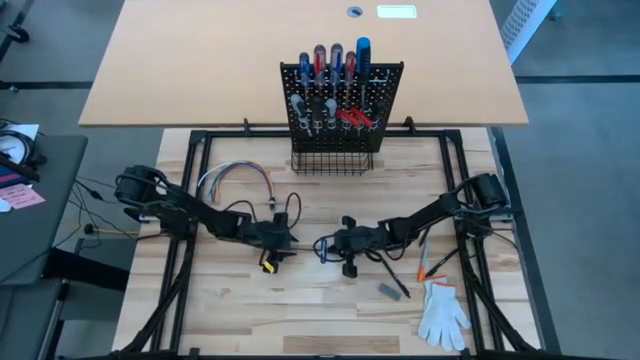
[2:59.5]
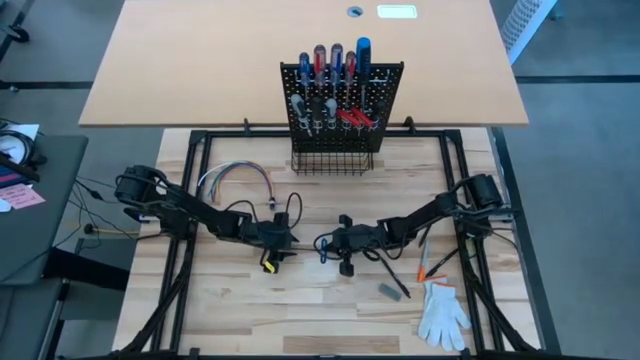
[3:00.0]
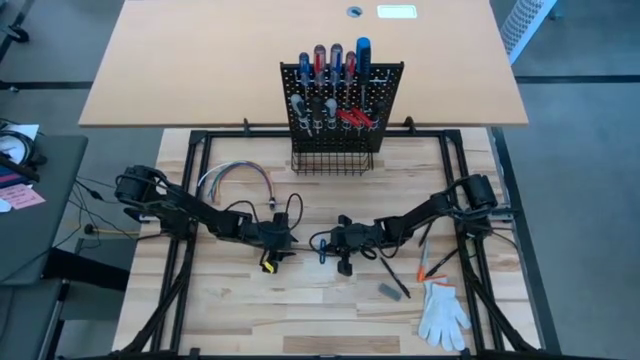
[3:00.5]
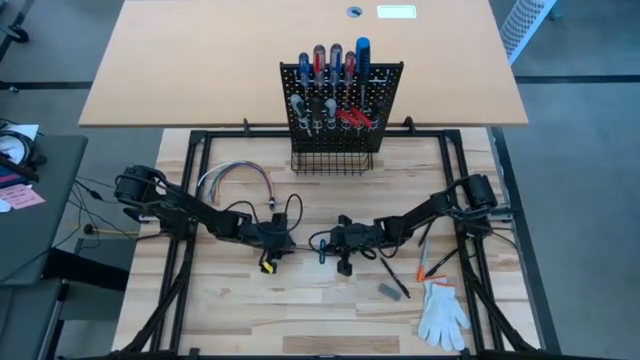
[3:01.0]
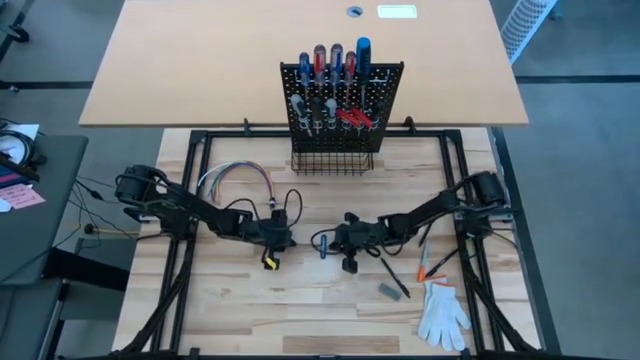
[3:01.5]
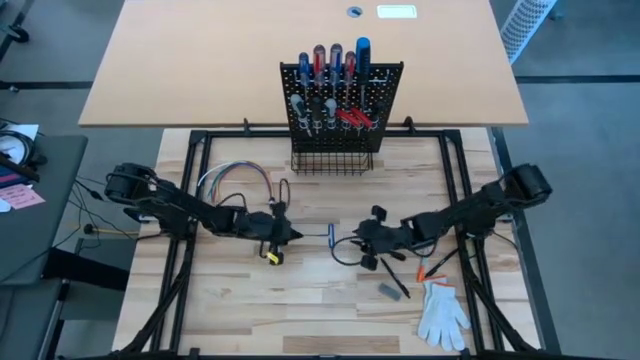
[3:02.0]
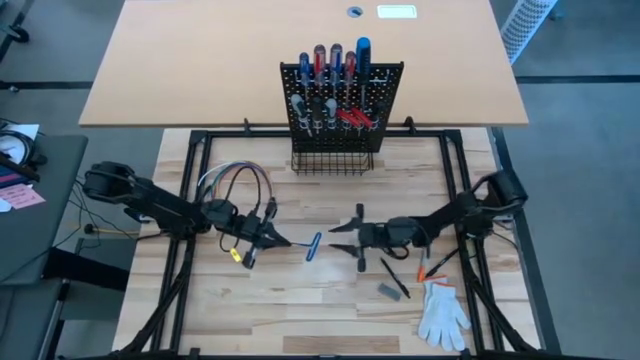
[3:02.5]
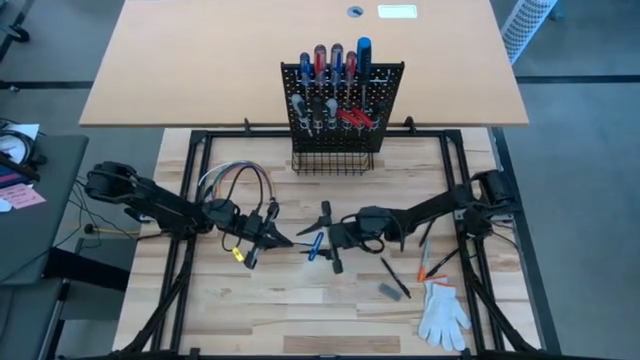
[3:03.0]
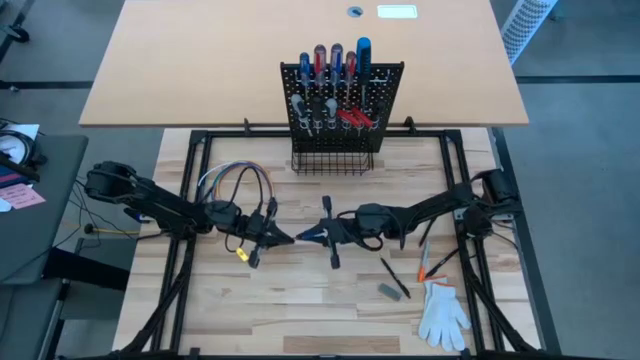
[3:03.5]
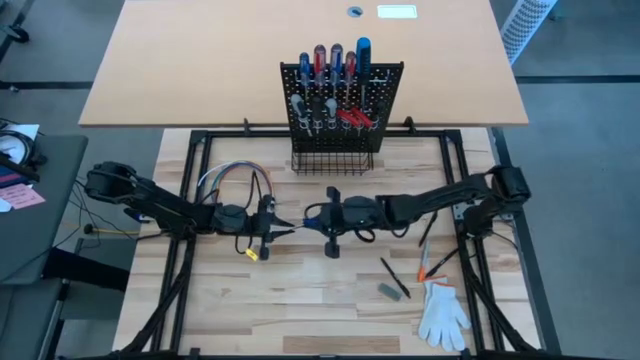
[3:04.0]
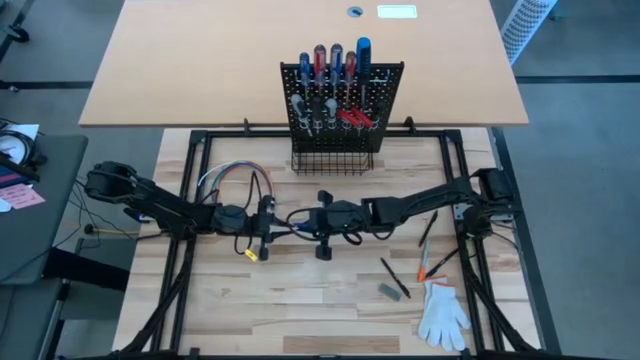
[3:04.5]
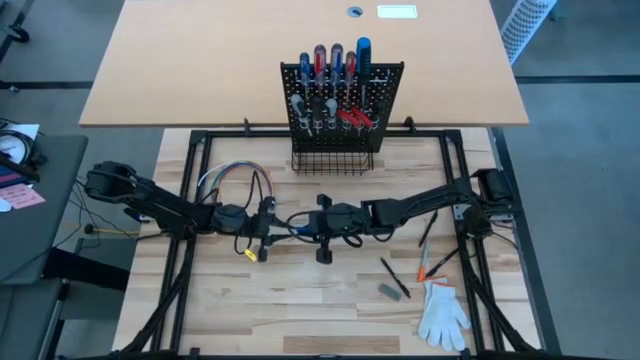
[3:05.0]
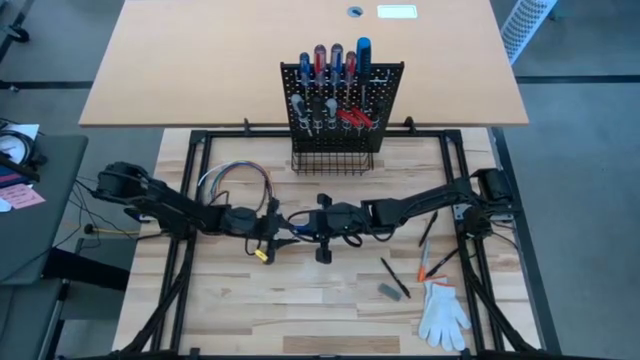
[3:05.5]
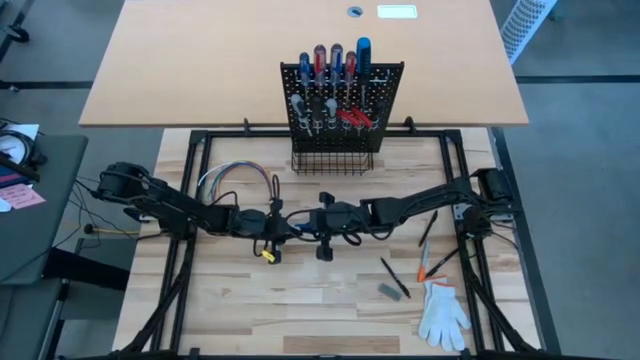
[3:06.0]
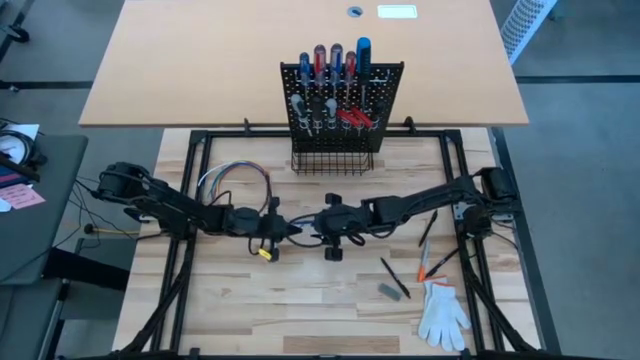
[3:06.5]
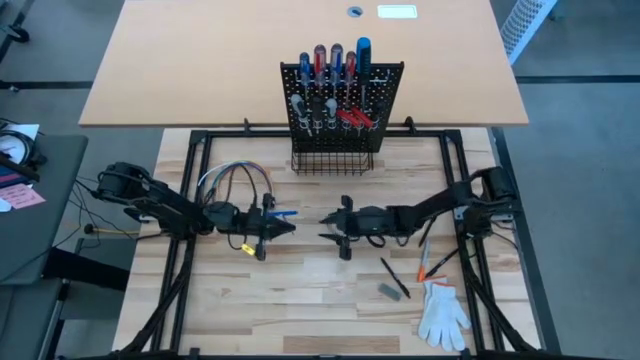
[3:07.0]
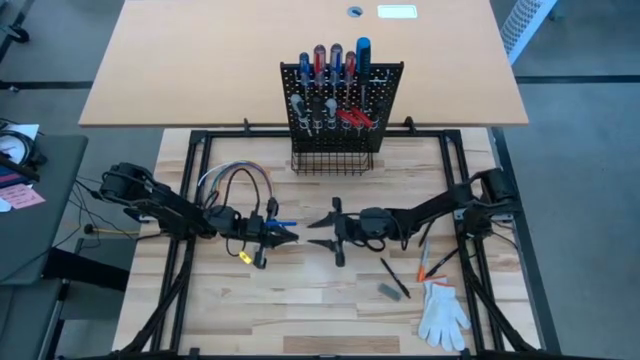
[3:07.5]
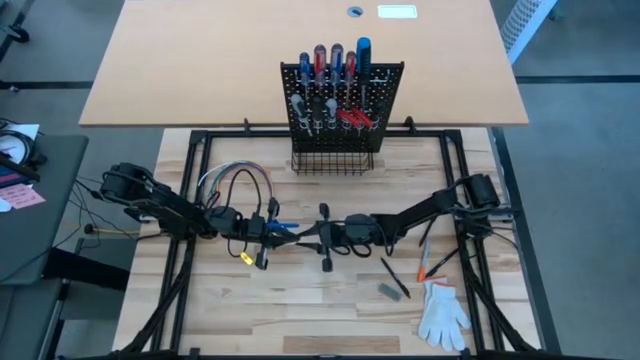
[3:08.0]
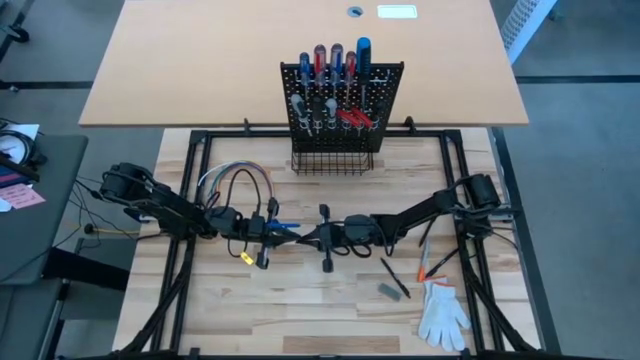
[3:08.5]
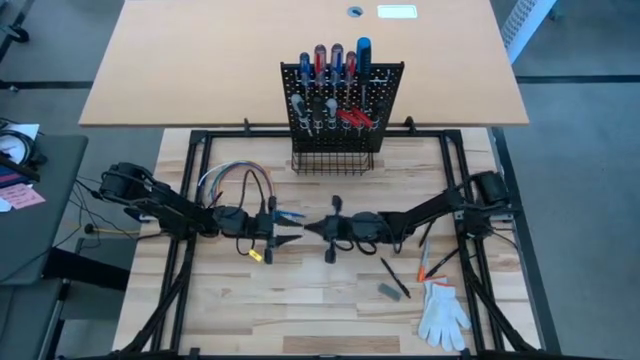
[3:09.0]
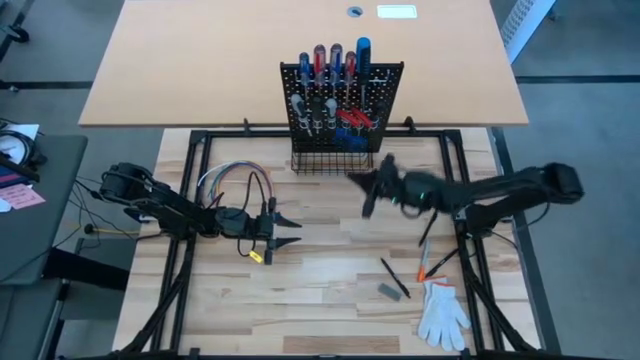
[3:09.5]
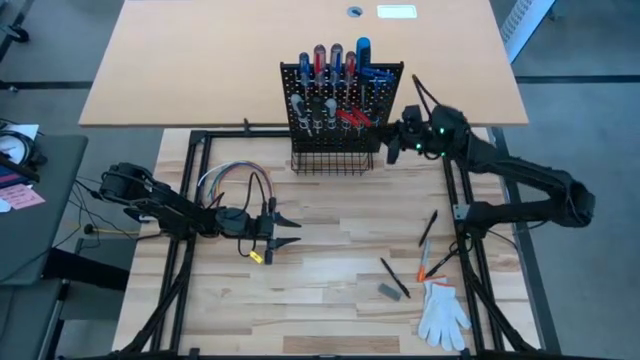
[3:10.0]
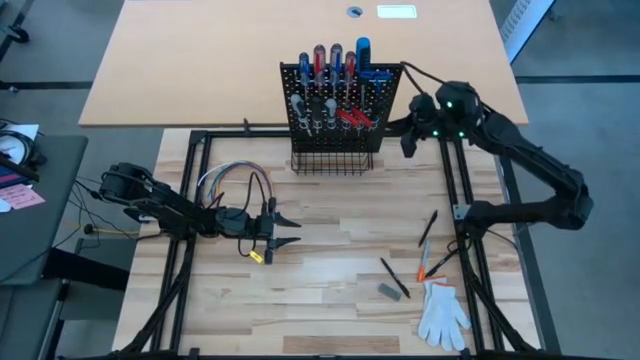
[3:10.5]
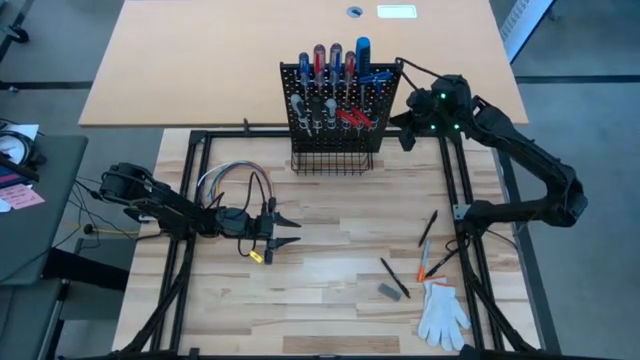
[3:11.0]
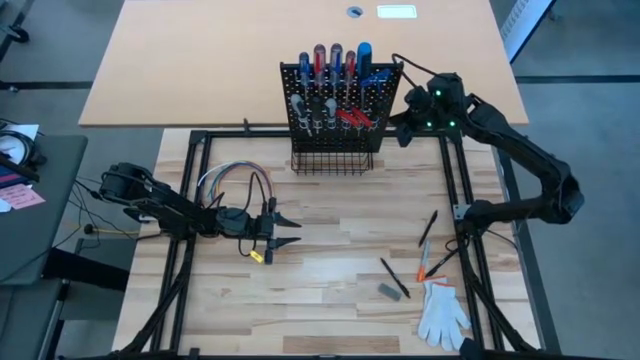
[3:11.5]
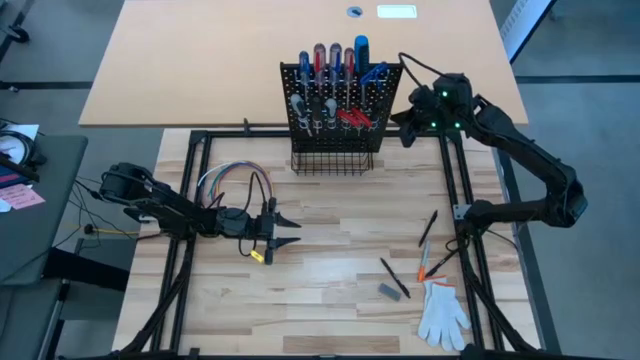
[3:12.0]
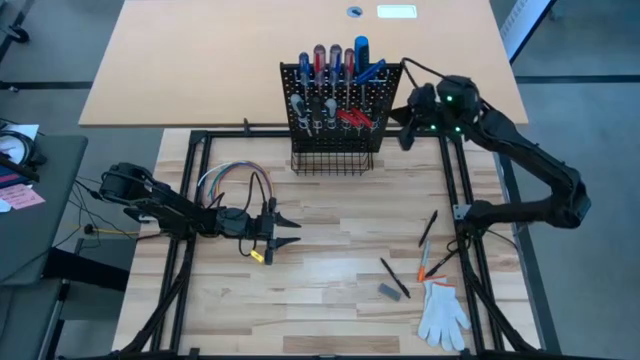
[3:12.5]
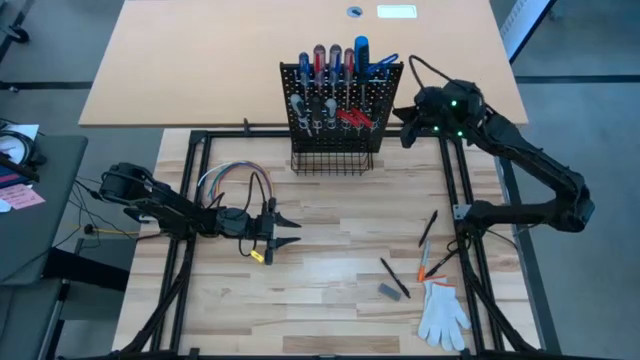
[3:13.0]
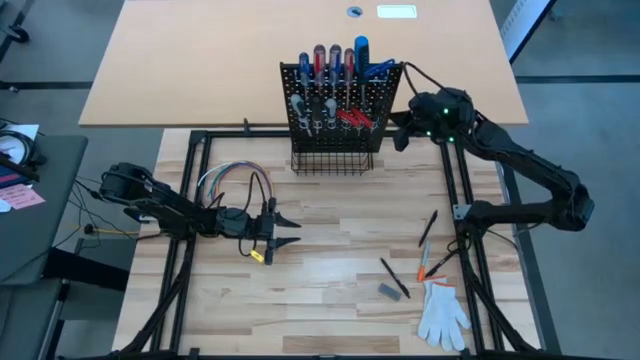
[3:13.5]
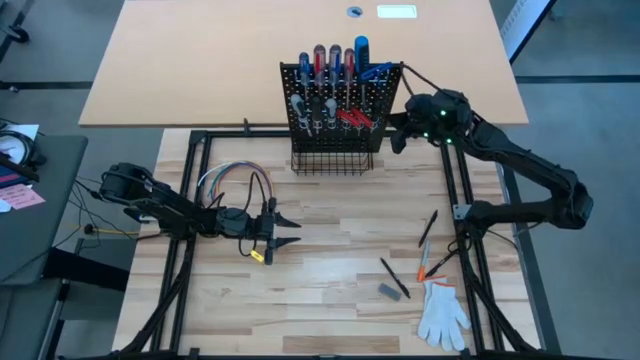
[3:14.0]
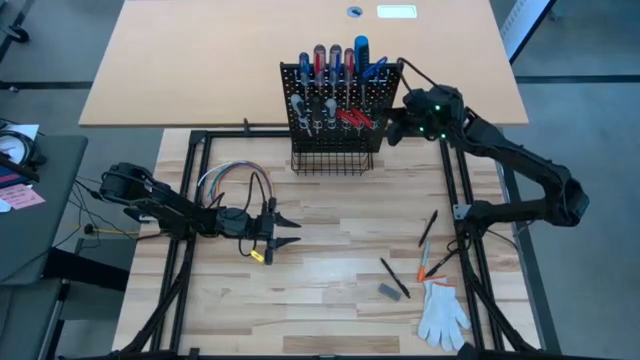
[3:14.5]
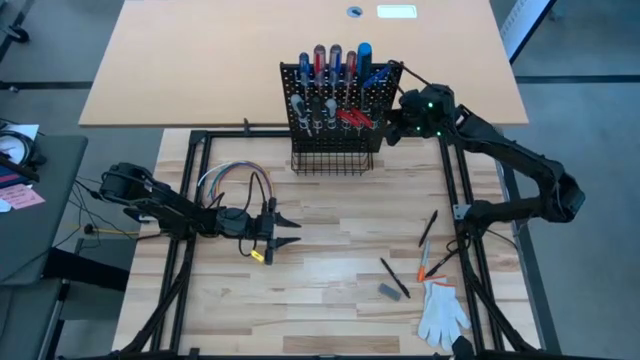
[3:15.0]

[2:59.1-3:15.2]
Task: Hang tools onto peg board
Hang the blue t handle screwdriver on the black peg board

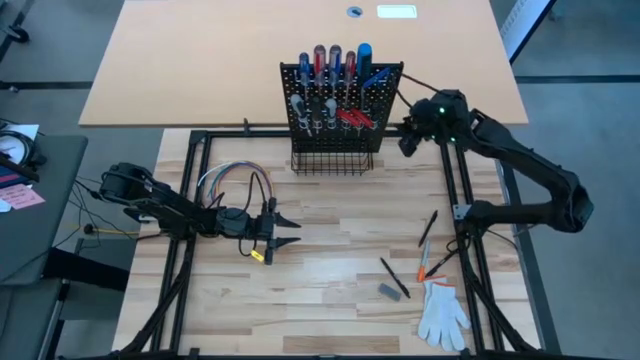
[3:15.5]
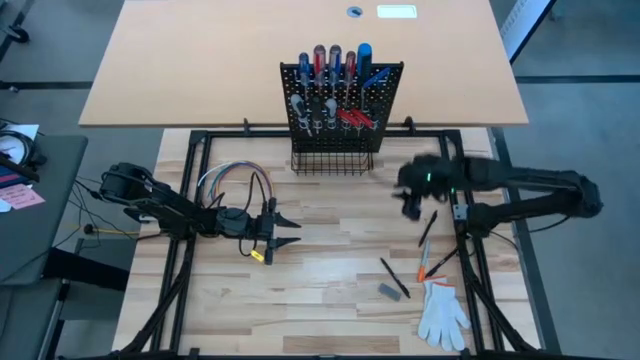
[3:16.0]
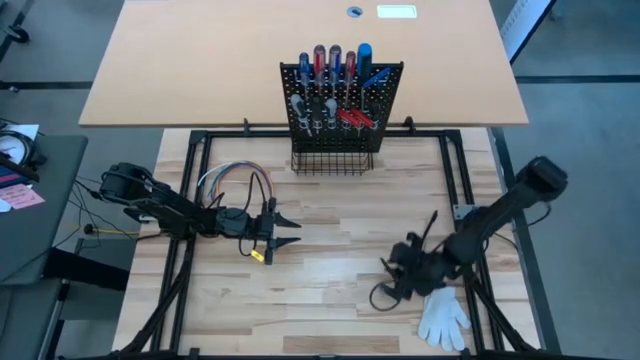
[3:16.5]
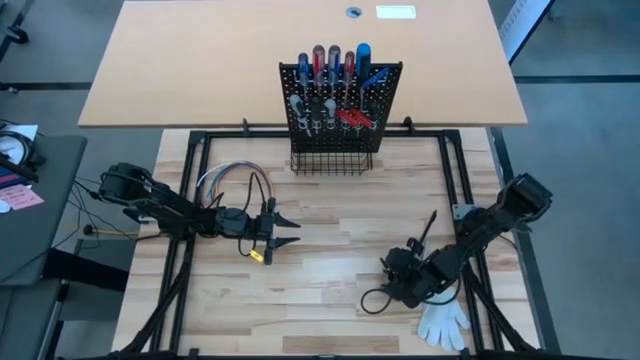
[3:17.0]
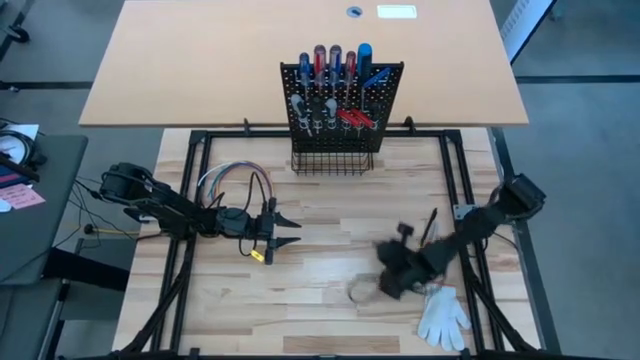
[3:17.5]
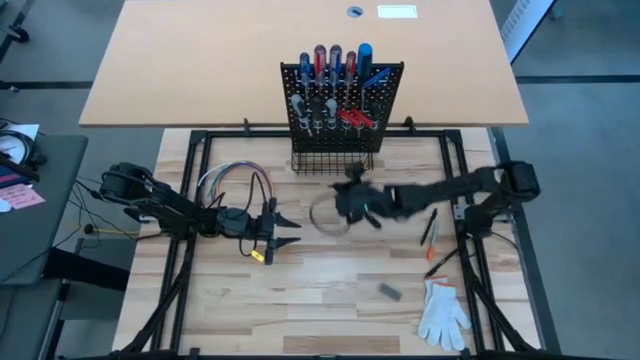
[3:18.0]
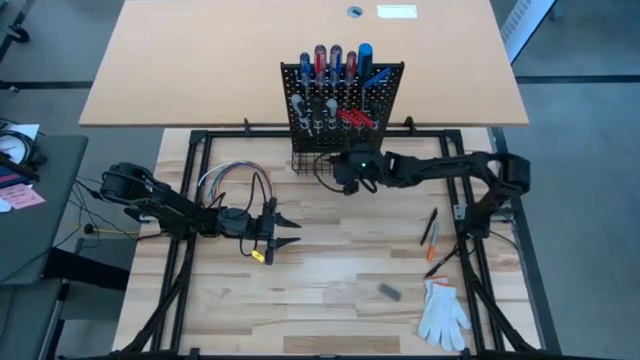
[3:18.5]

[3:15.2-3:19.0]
Put the bottom left black pen into the black basket

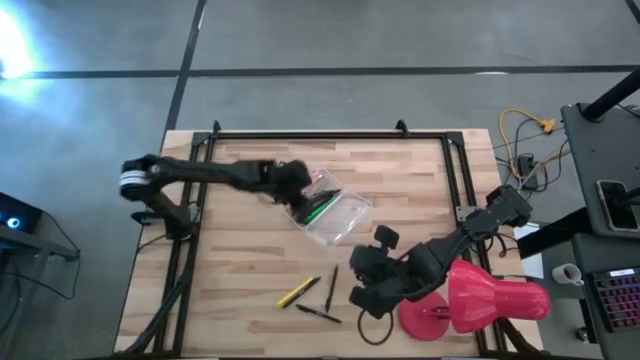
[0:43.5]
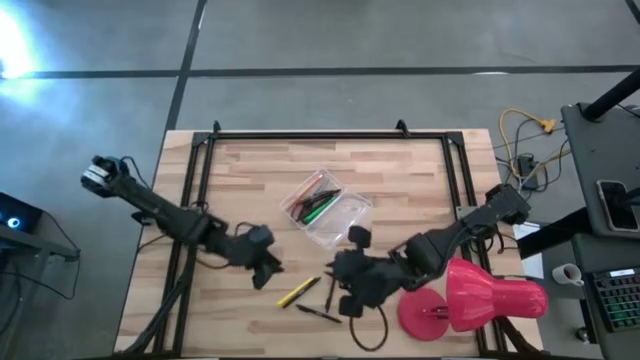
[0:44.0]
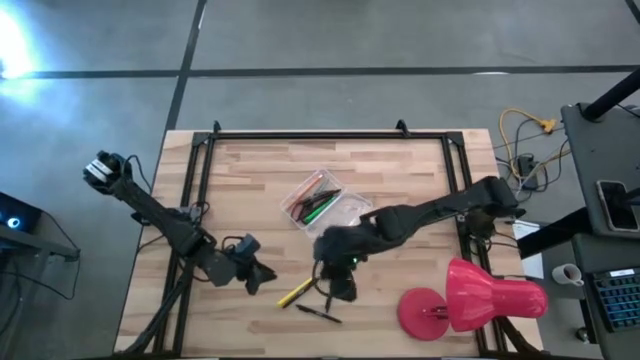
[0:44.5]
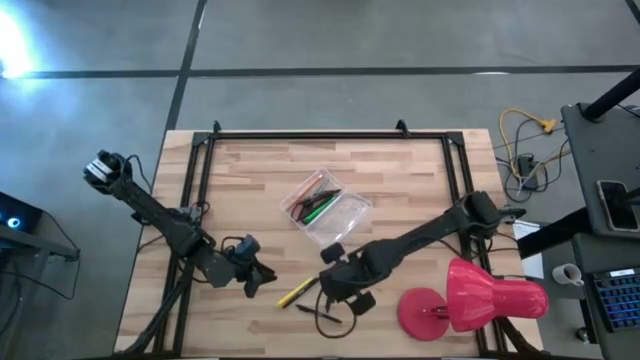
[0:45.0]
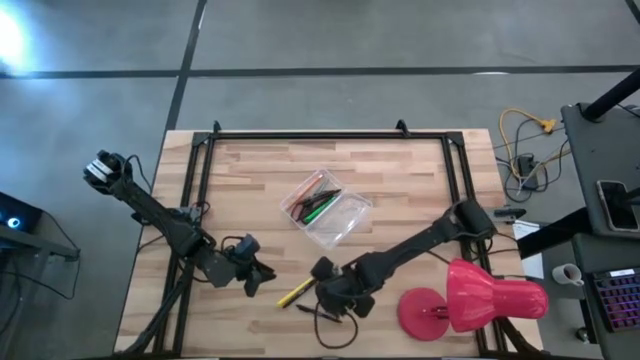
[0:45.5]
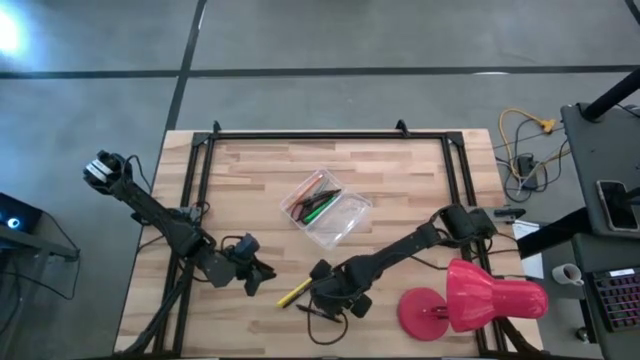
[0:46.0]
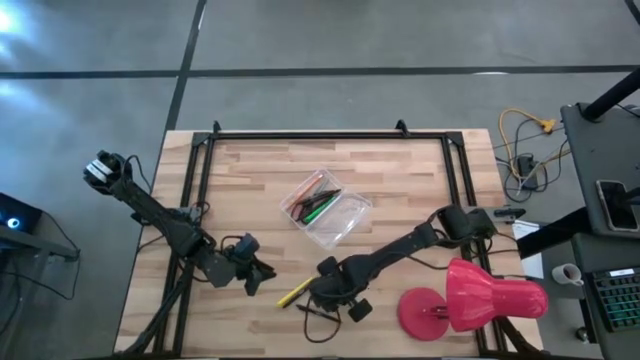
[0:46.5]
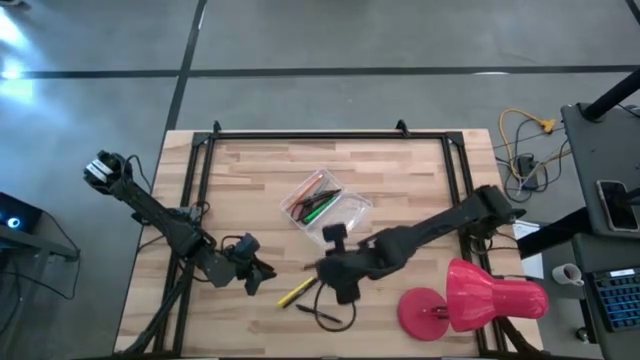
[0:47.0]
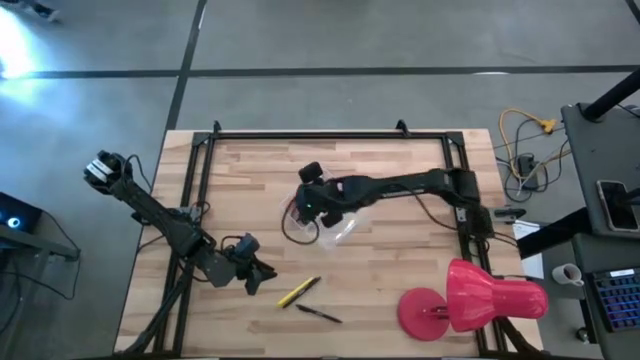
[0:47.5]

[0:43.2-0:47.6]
Task: Pick & place school supplies into a supply box
Put the black pen into the transparent supply box
